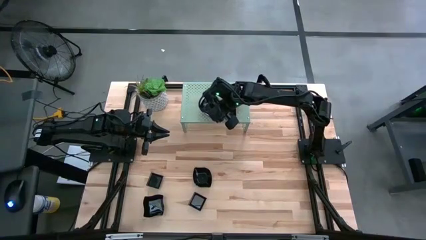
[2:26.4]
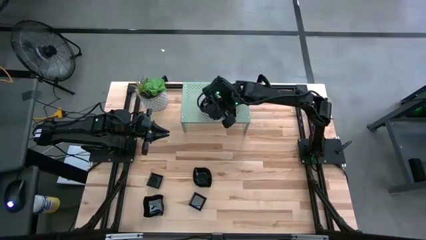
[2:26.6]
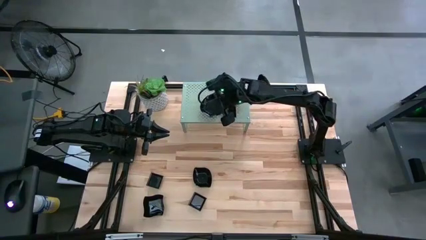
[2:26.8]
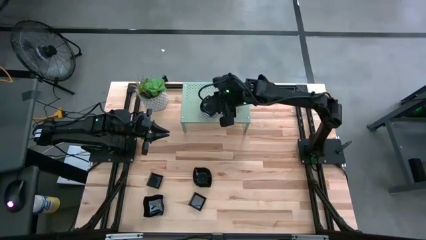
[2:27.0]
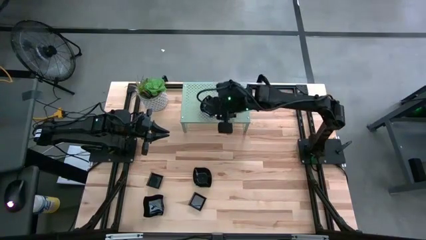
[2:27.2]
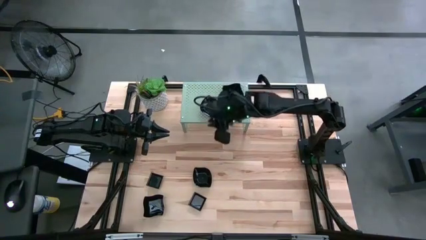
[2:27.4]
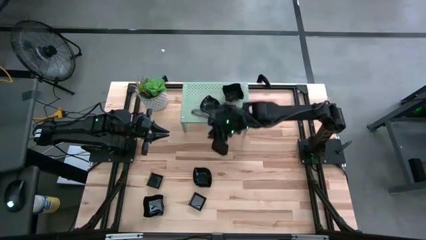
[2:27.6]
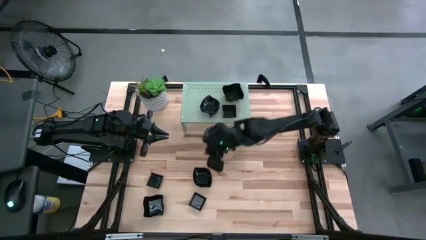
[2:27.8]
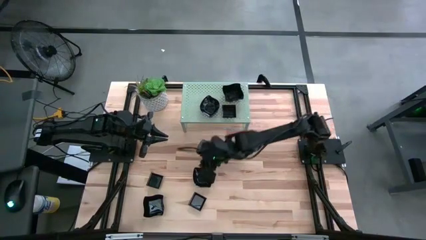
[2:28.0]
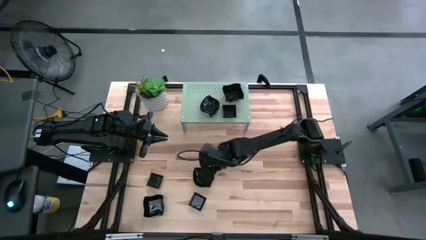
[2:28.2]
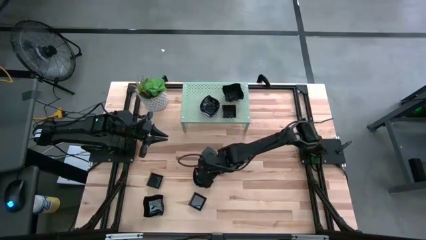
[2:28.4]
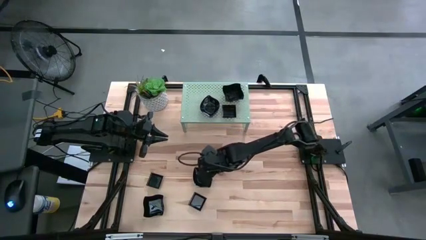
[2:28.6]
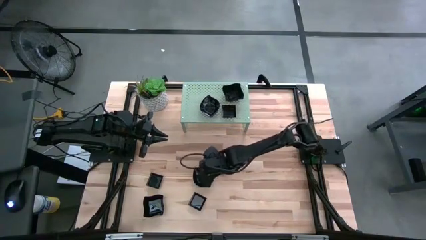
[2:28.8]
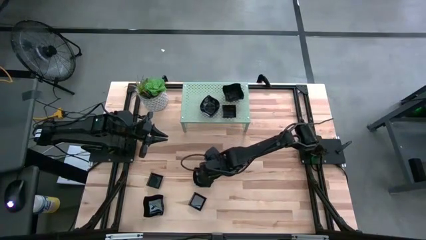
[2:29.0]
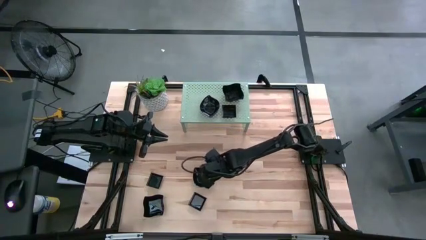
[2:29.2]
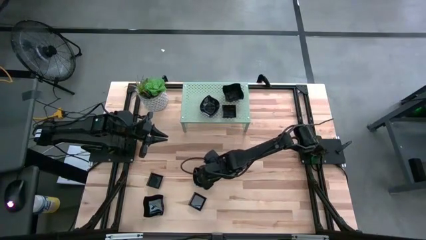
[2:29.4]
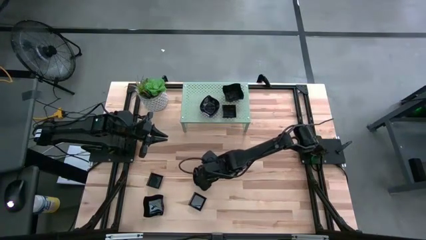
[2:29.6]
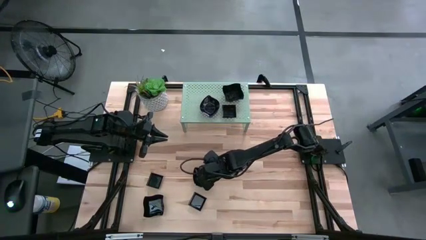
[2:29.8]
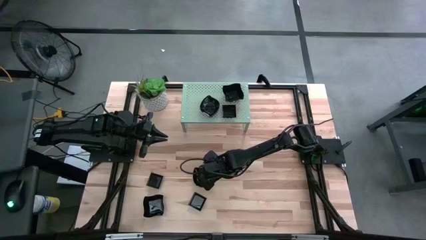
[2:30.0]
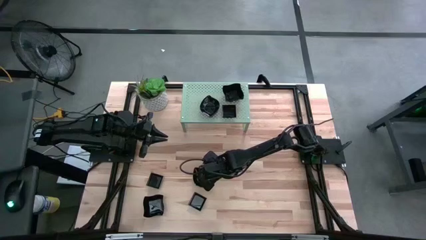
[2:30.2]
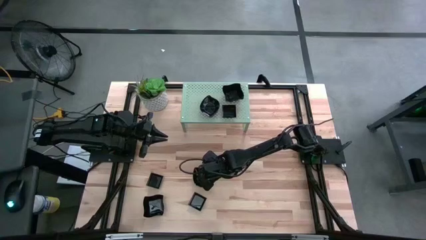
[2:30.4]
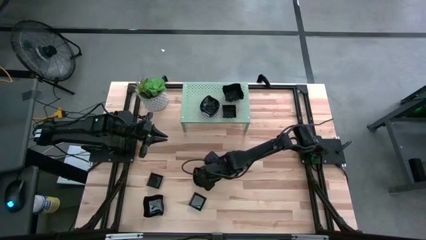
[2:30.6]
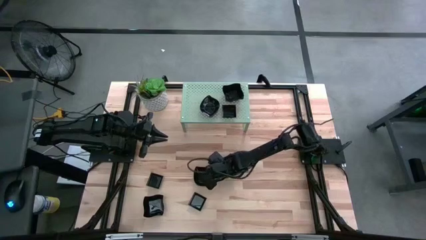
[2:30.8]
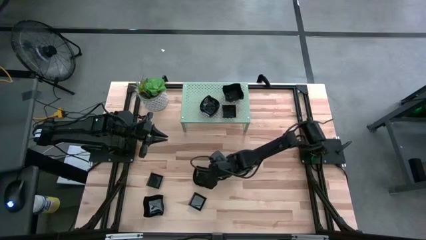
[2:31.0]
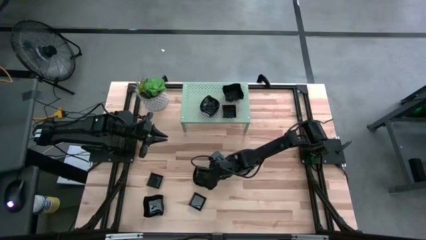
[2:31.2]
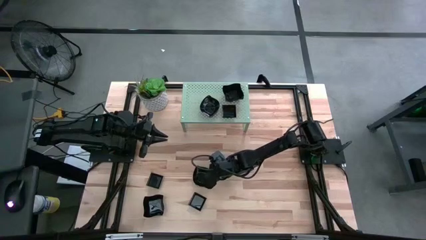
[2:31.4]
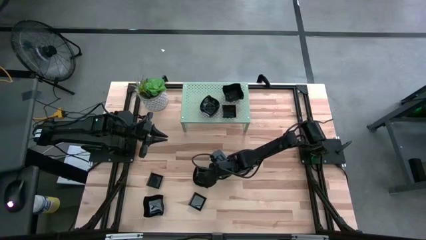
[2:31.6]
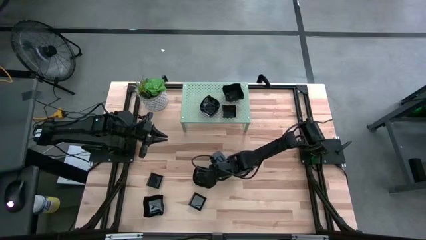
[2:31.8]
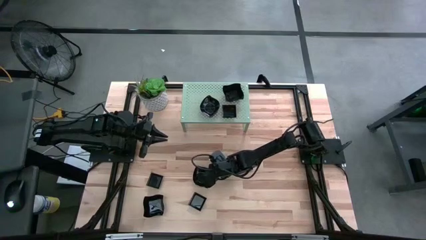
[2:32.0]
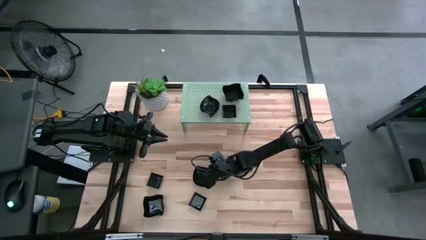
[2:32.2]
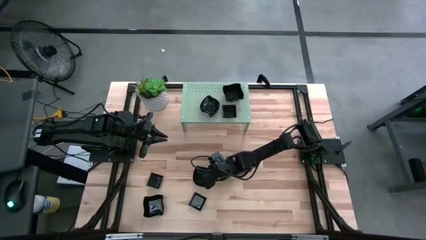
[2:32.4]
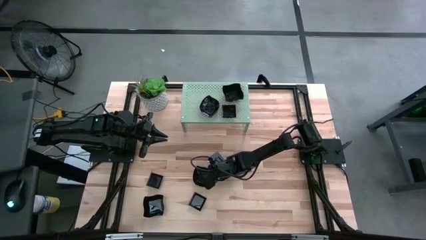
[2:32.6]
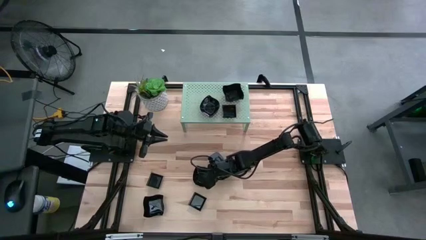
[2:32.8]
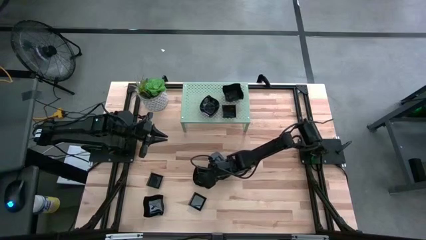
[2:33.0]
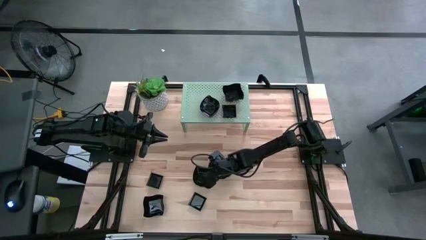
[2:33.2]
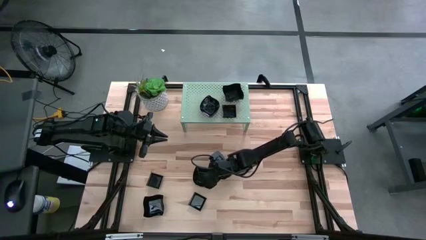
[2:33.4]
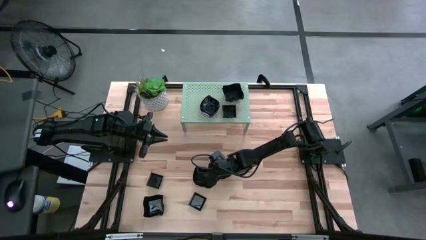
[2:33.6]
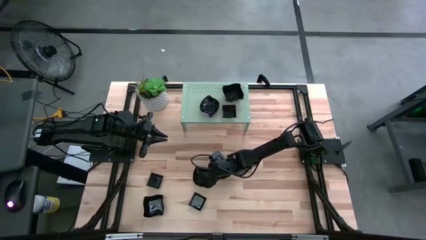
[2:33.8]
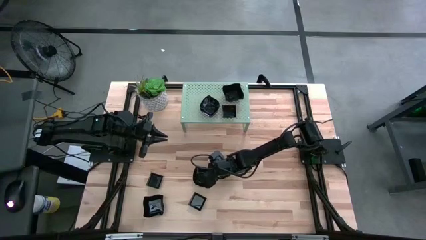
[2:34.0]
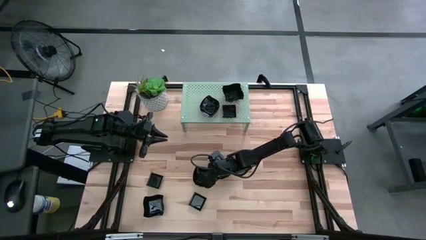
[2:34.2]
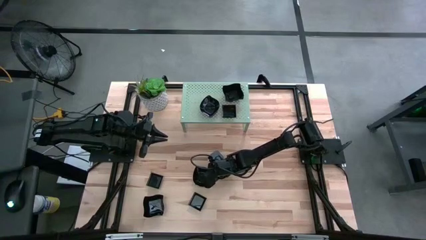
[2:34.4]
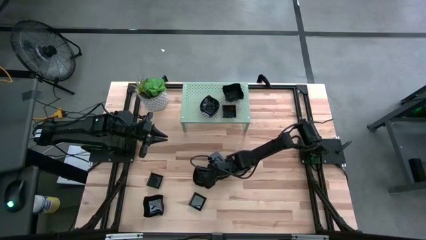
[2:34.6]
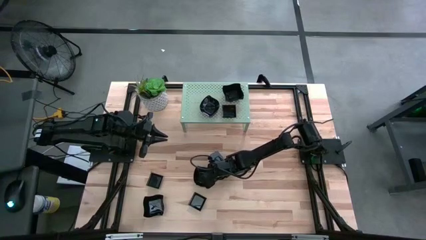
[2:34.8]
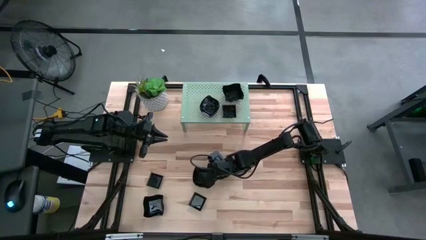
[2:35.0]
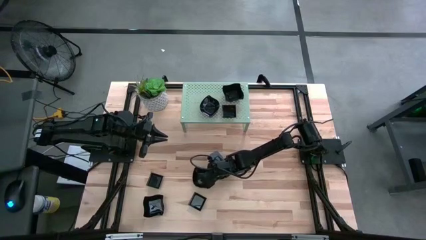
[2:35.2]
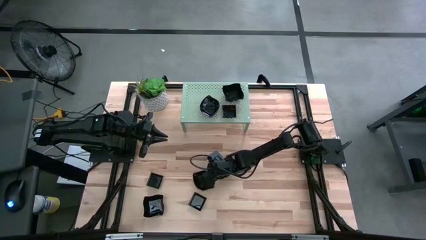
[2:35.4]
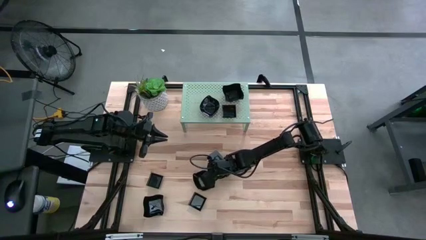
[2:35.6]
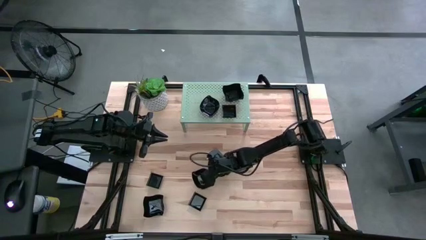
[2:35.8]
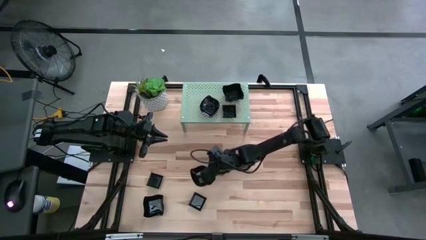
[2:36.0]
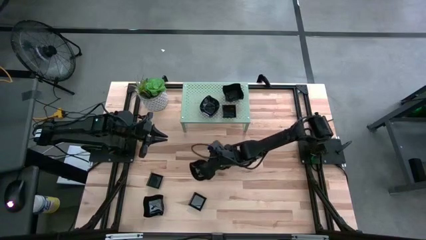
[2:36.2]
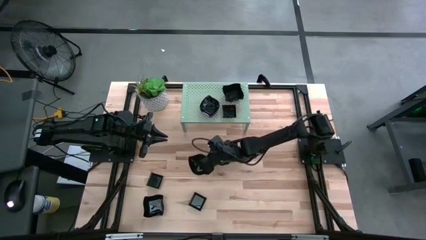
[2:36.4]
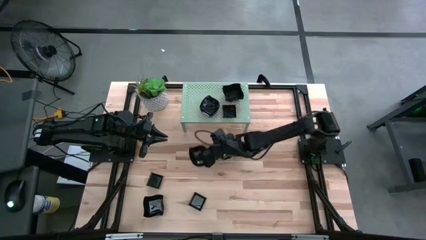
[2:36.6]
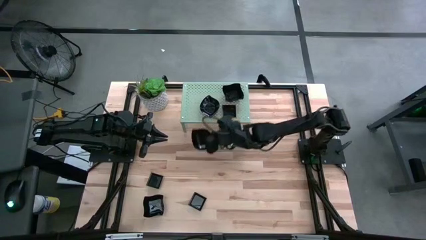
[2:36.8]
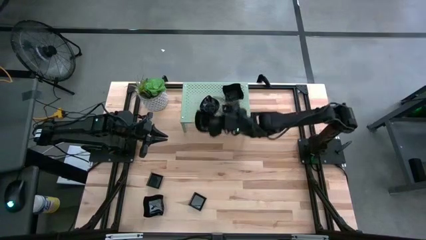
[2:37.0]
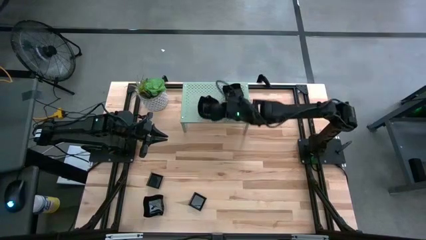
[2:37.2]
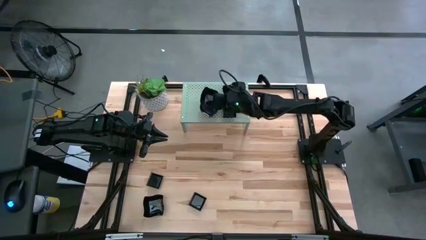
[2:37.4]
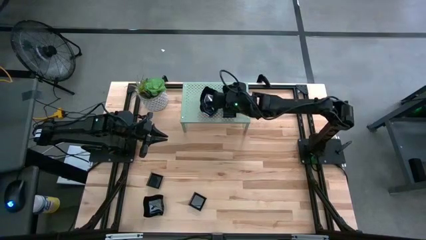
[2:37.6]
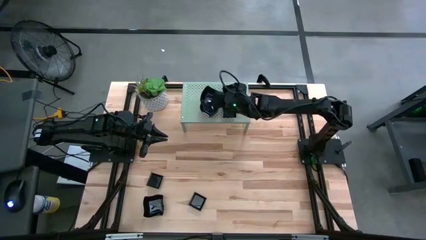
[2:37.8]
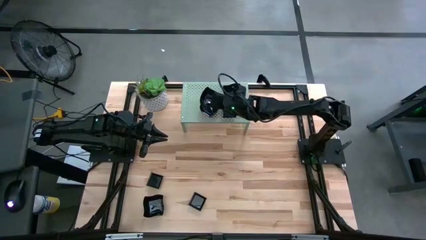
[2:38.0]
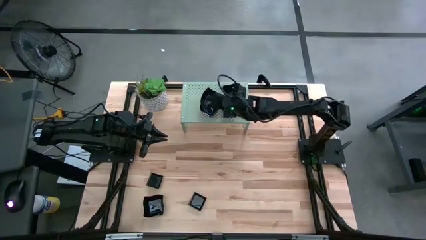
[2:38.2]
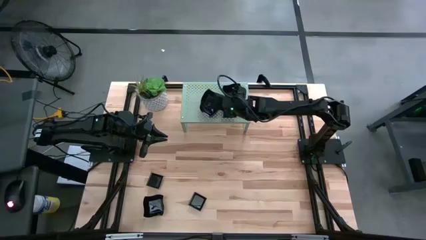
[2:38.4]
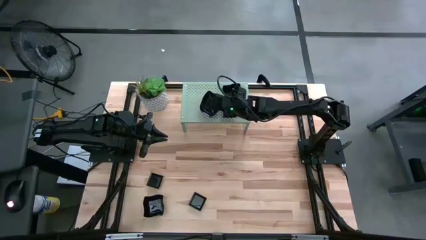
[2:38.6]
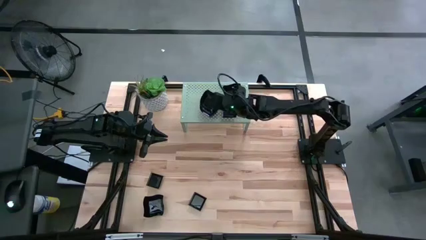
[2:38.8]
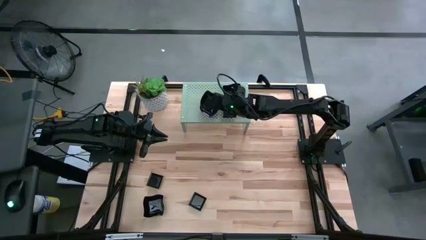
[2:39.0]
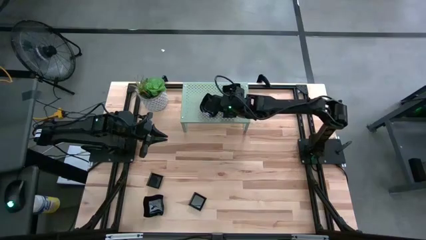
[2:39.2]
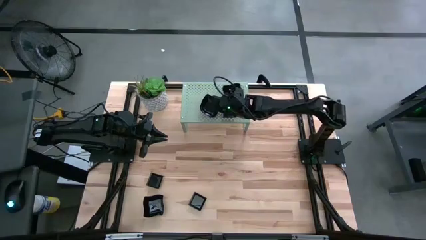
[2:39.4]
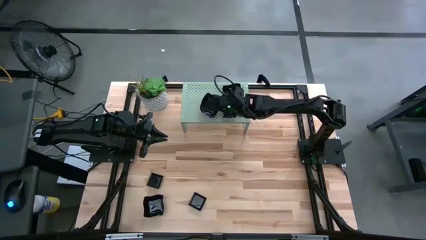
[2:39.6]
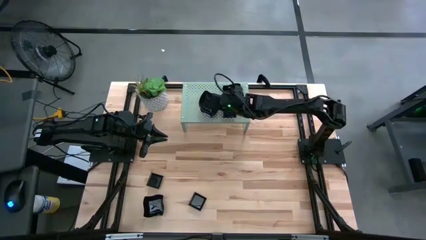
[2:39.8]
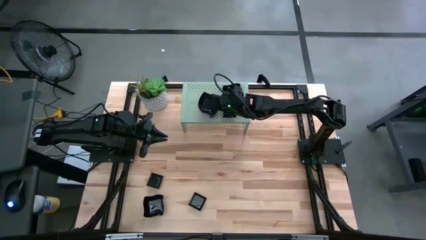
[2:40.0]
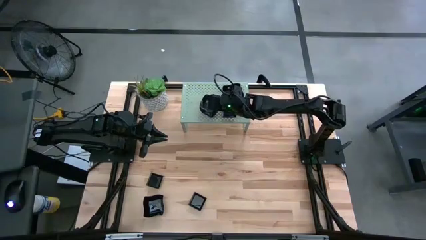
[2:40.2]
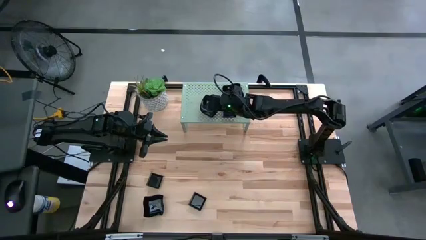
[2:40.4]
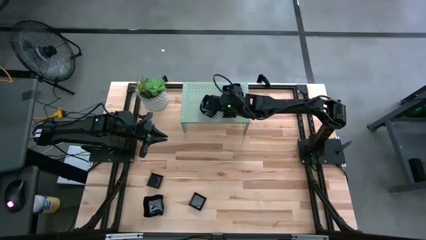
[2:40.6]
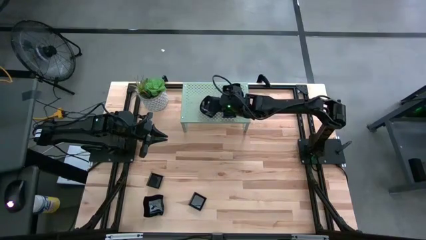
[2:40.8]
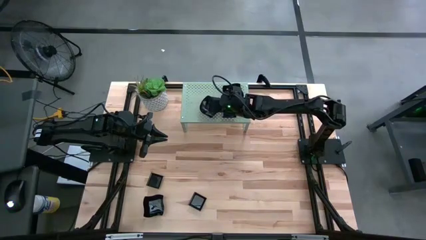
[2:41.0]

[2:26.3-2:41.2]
Task: Pick & Place Mini shaped plates
Stack the leaf shaped plate on top of the leaf shaped plate on the shelf

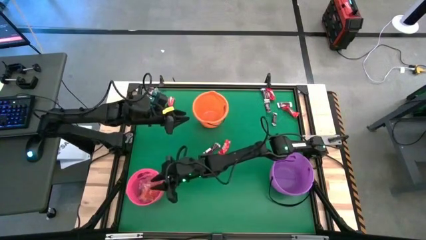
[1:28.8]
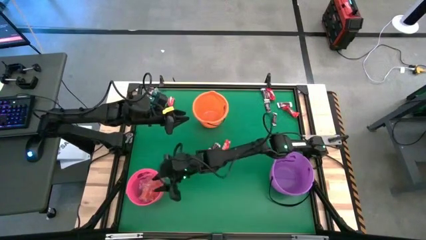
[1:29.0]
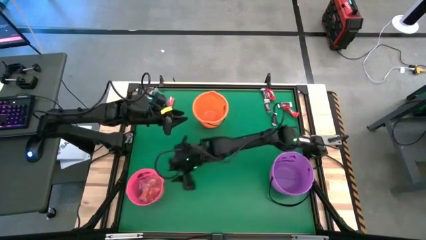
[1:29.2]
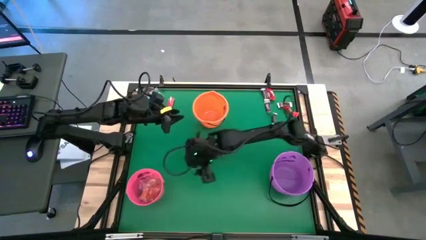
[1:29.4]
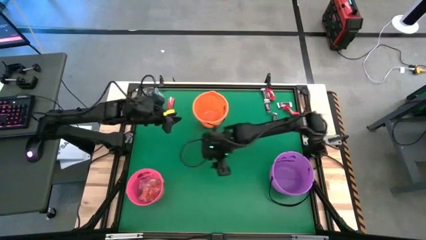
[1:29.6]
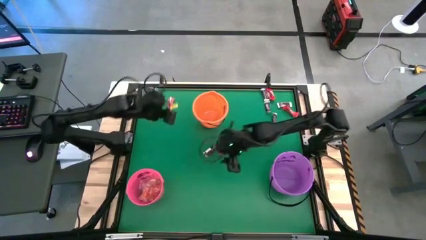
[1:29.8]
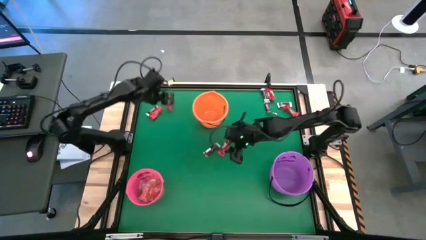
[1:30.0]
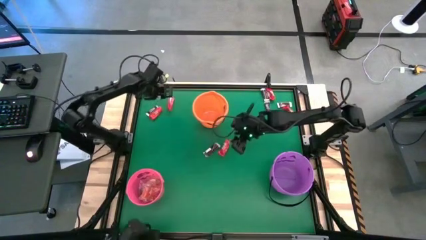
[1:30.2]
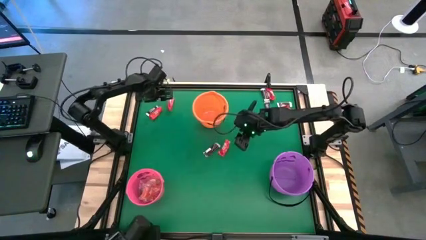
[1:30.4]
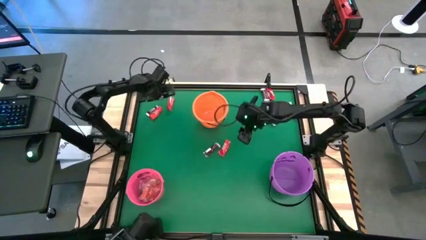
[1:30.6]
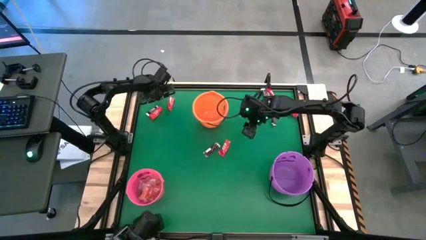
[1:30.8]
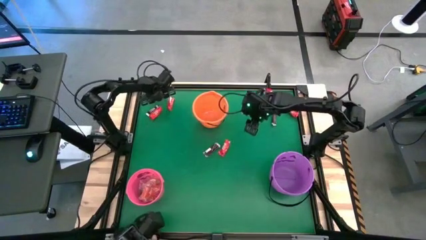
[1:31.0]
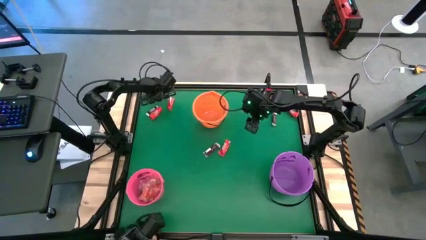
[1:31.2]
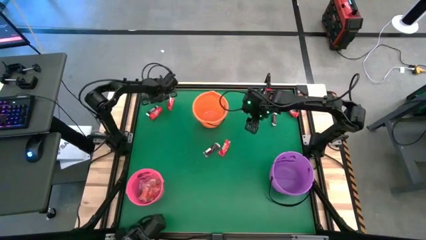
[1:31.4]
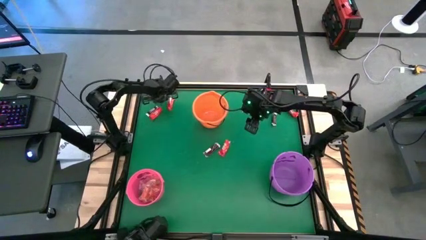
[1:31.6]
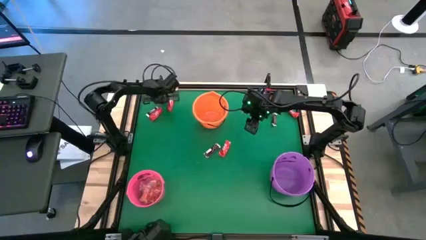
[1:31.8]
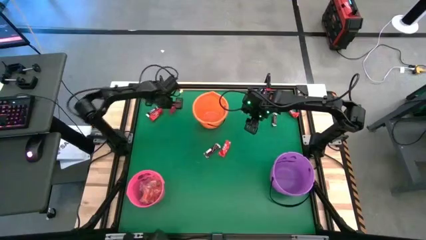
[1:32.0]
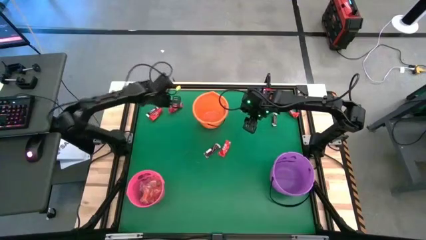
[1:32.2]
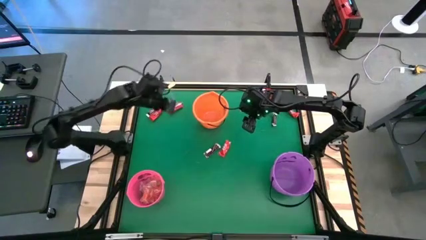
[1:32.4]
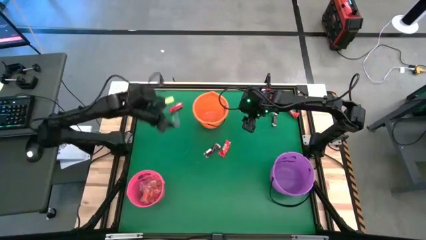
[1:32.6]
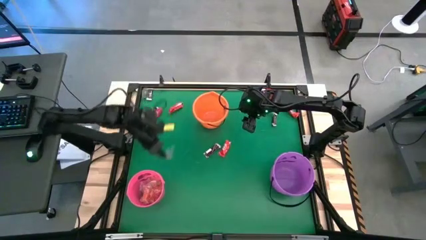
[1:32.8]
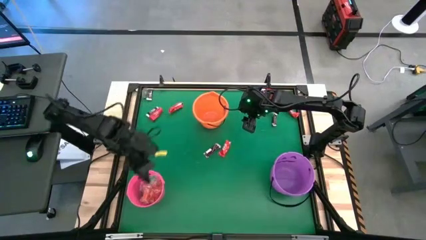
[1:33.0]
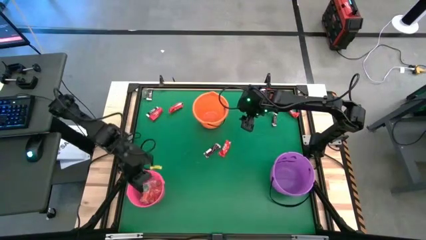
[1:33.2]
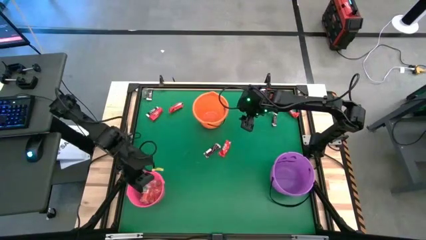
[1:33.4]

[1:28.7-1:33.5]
Task: Sort candy by brand, put in halloween buckets
Put the blue gummy into the pink bucket
